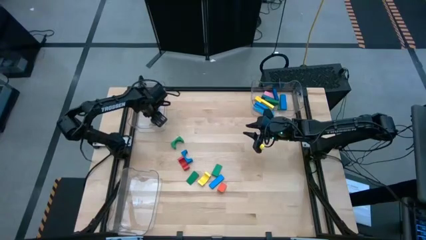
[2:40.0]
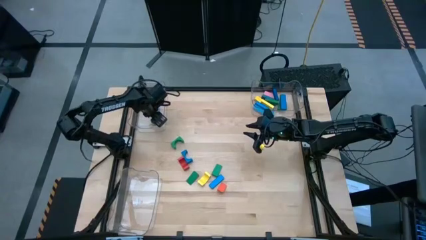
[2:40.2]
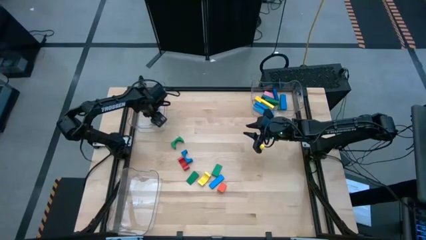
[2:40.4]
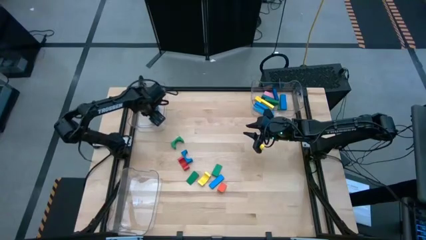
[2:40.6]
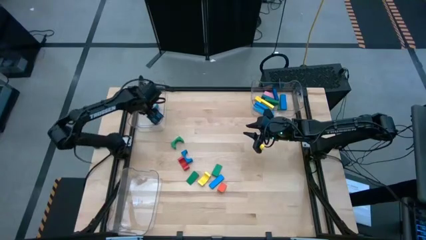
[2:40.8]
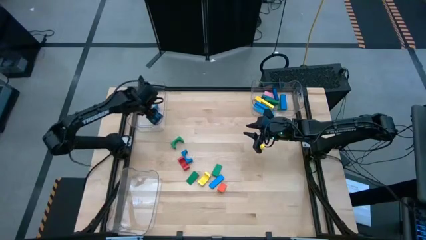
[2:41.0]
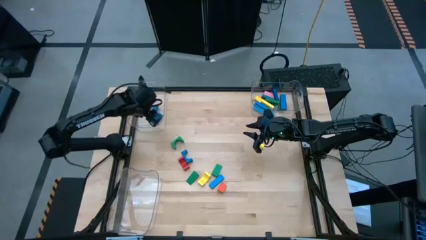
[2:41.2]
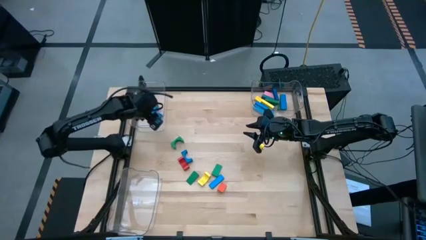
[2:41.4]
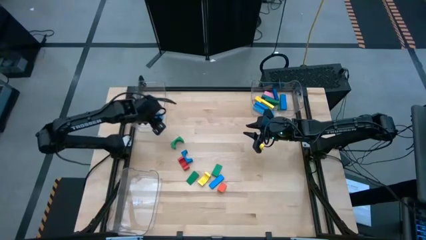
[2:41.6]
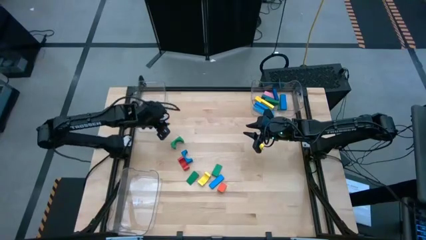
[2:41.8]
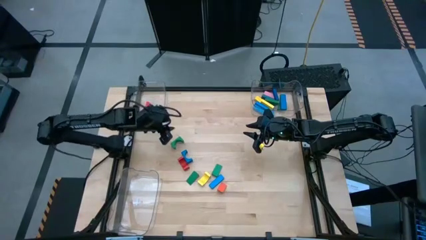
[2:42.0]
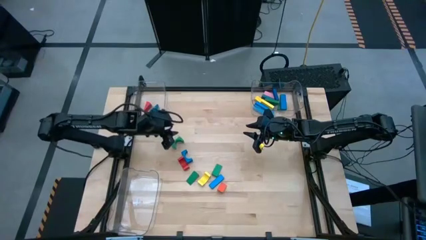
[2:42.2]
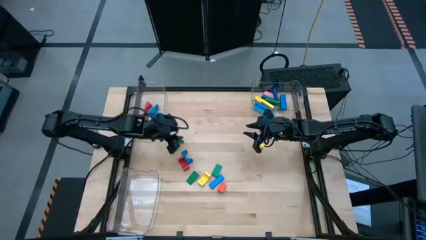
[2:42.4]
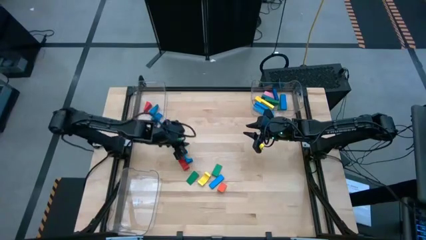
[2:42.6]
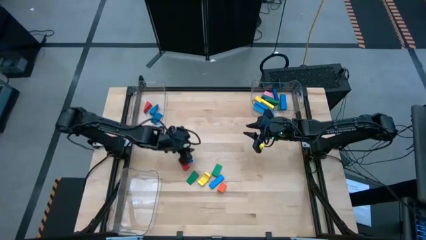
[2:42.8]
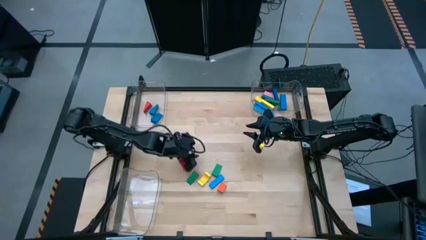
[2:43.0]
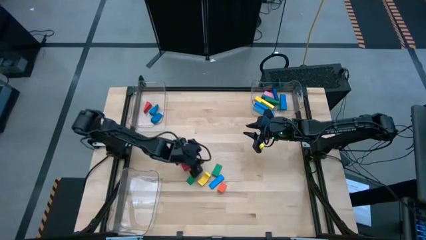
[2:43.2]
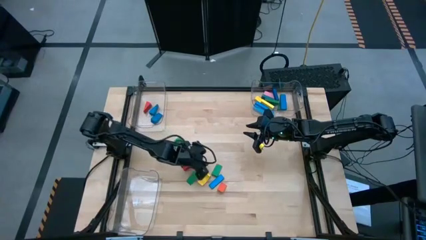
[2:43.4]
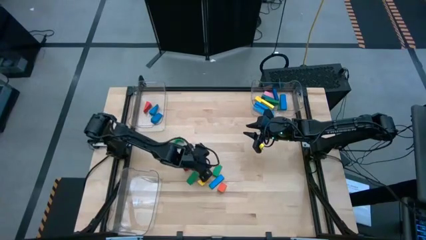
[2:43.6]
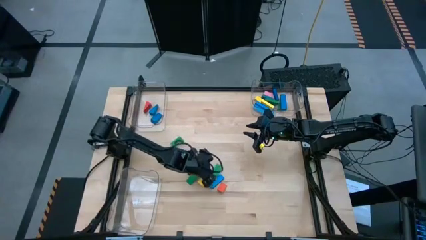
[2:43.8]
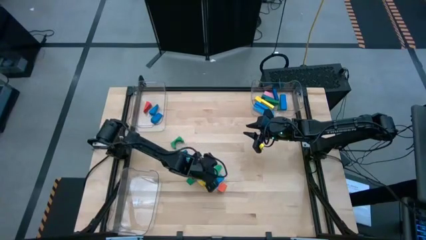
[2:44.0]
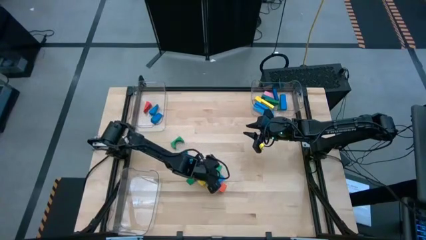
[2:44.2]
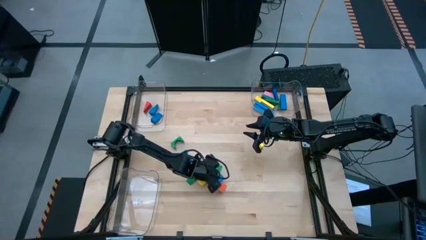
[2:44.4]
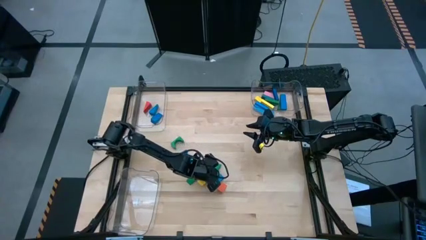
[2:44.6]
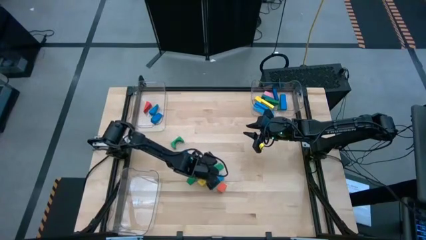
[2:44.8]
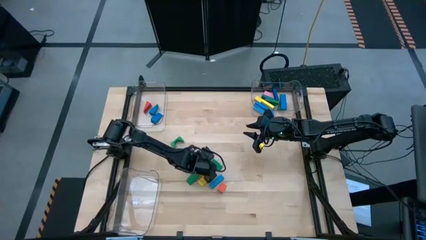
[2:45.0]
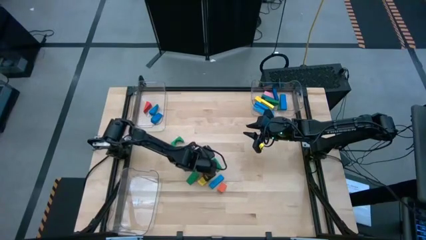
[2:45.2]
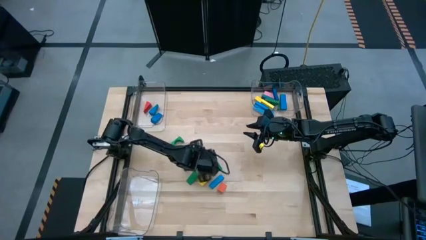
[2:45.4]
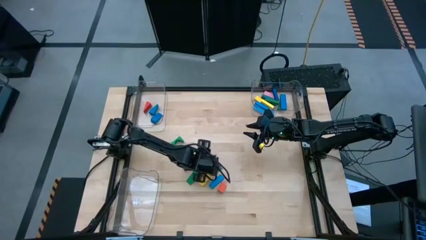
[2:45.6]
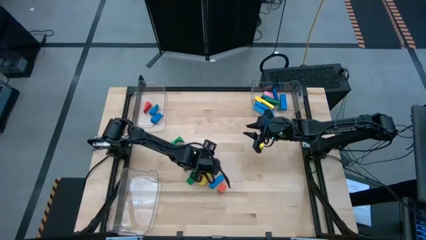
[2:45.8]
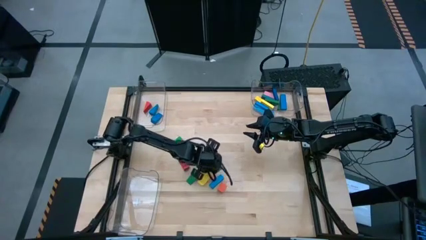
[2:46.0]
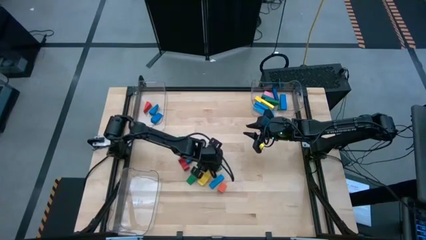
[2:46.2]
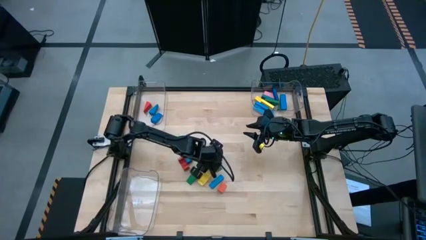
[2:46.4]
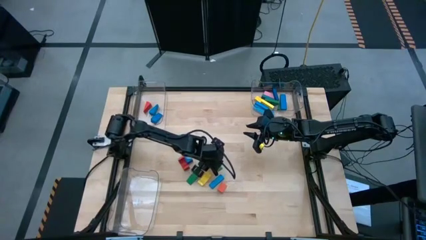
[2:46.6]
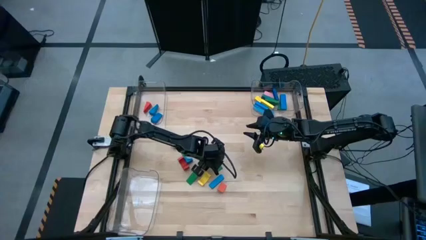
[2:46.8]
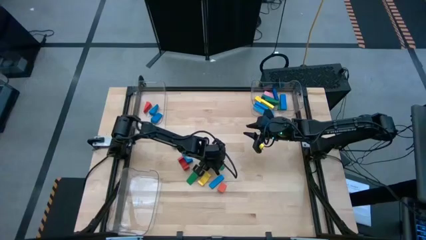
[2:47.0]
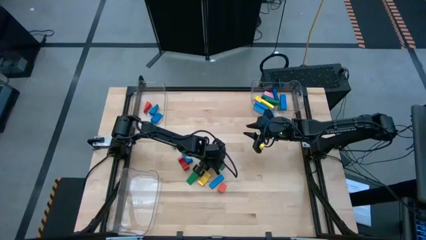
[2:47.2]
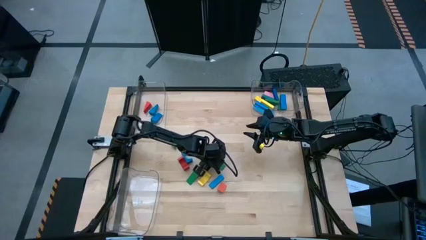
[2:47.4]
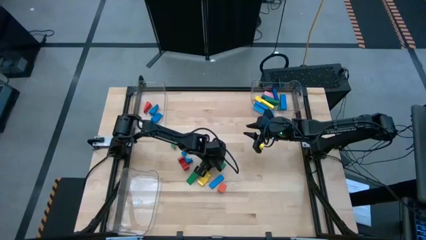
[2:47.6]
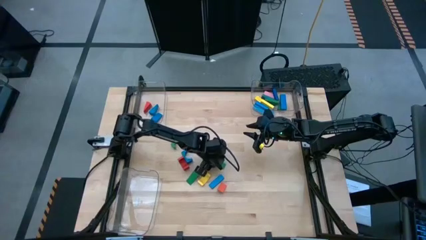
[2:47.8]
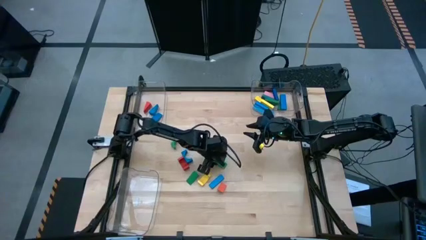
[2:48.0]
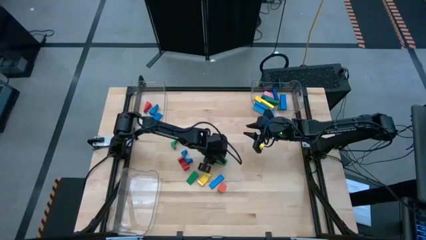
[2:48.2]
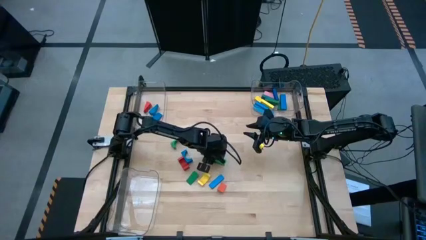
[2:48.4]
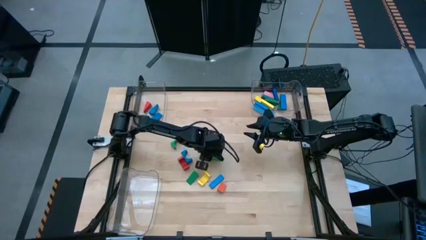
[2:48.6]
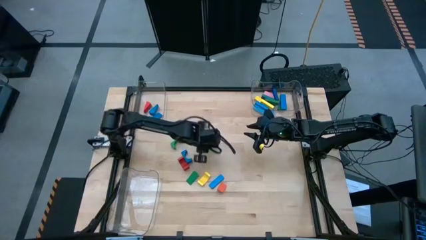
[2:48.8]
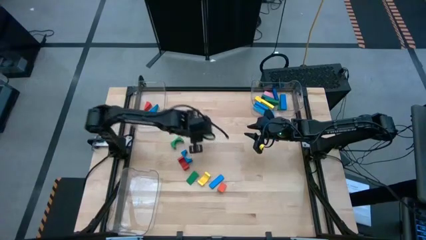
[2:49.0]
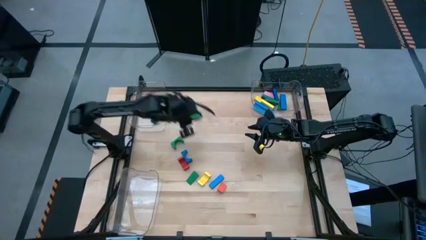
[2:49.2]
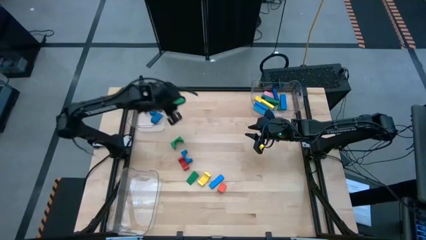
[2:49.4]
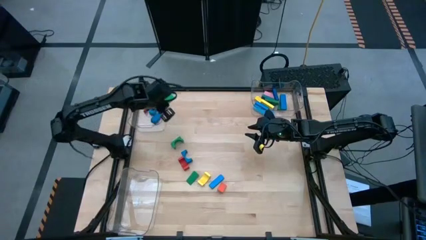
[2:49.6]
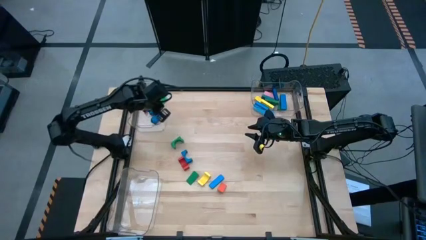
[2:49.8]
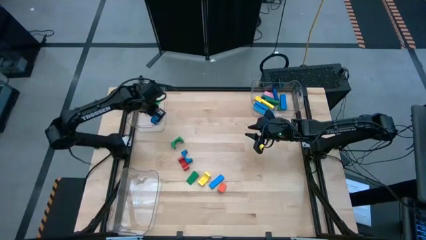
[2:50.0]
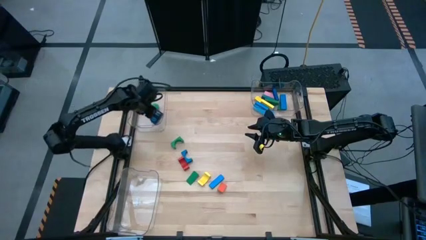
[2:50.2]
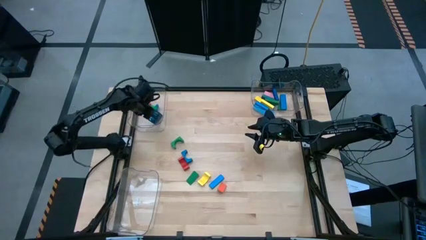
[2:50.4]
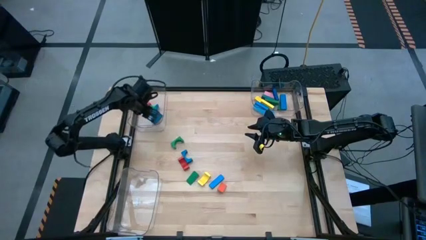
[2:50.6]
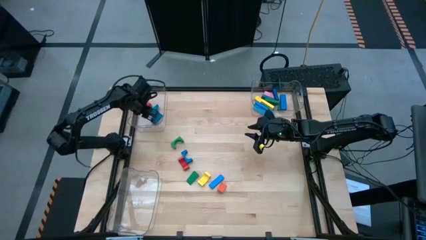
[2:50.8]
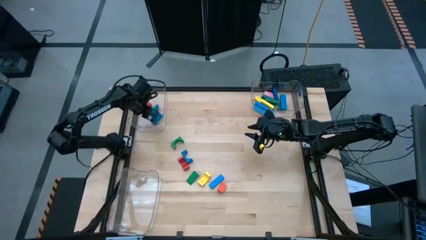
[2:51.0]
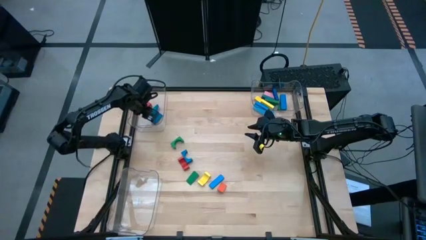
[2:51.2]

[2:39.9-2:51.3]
Task: Sort blocks by size
Put the green triangle block into the top left transparent bin

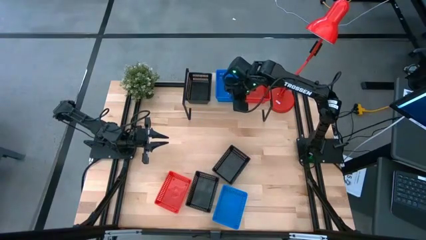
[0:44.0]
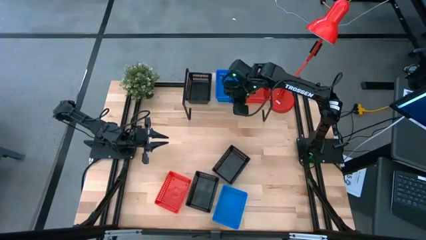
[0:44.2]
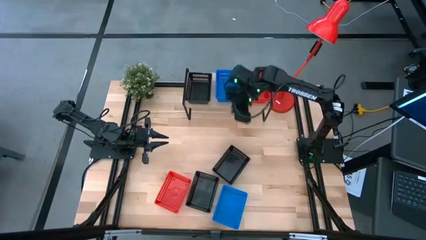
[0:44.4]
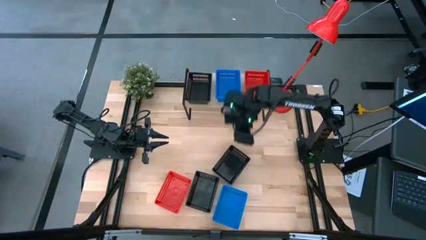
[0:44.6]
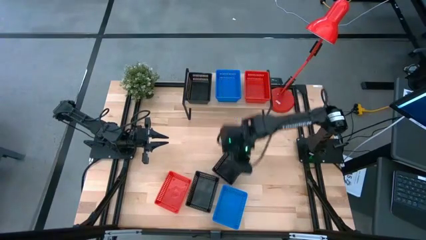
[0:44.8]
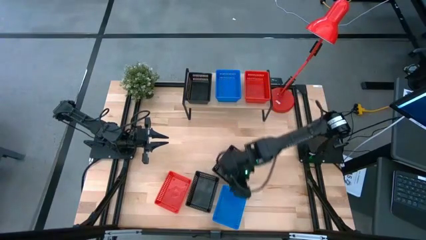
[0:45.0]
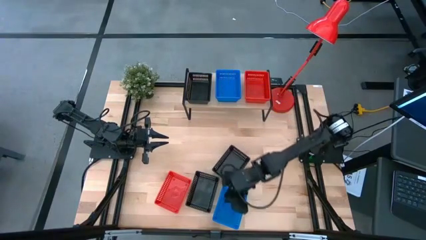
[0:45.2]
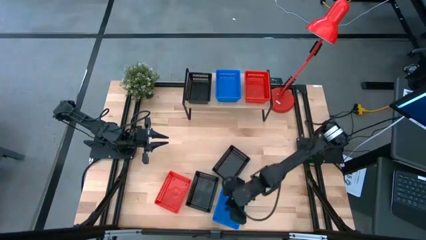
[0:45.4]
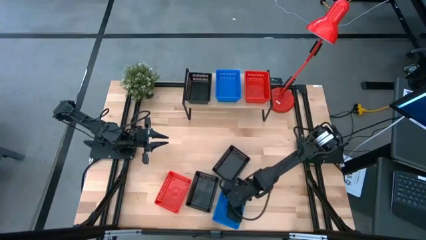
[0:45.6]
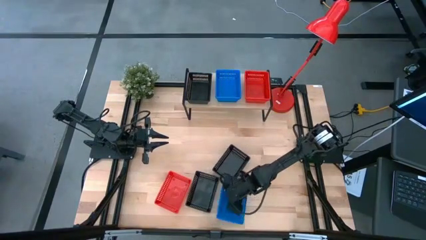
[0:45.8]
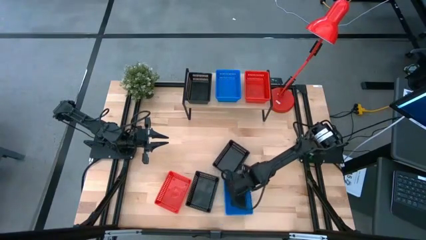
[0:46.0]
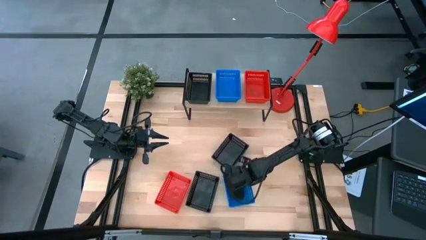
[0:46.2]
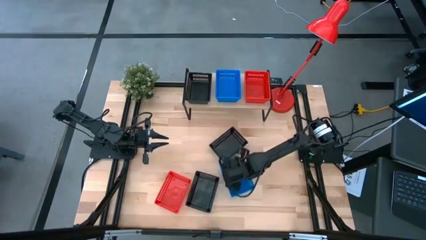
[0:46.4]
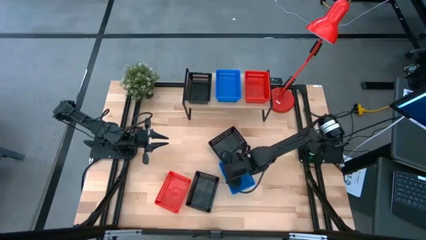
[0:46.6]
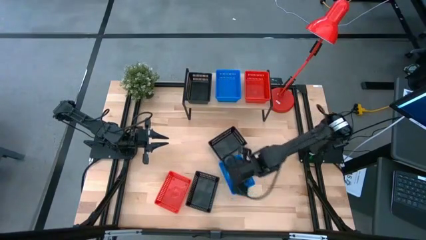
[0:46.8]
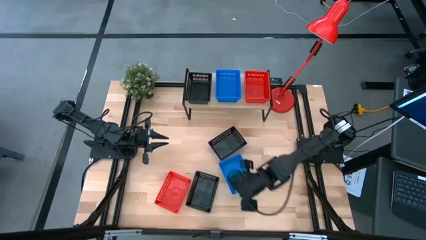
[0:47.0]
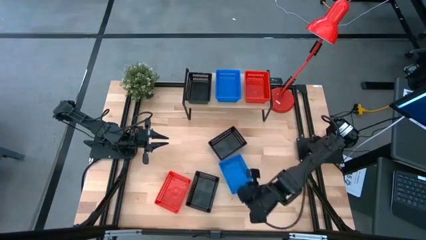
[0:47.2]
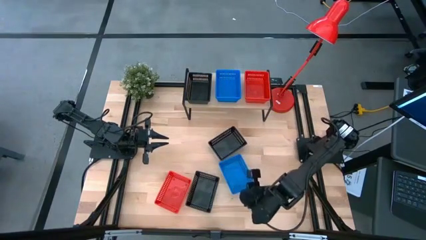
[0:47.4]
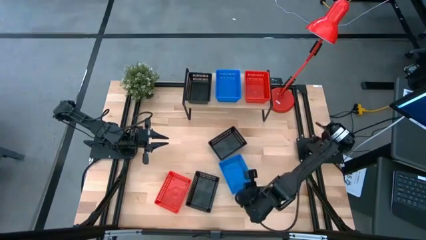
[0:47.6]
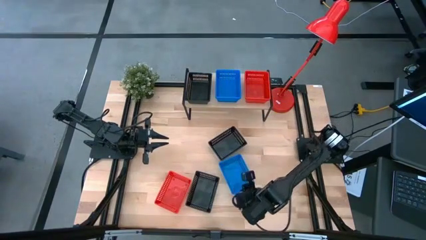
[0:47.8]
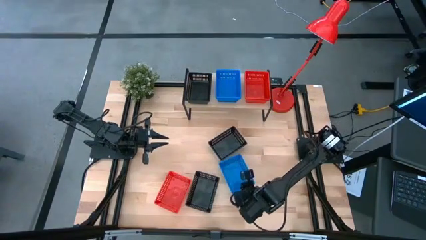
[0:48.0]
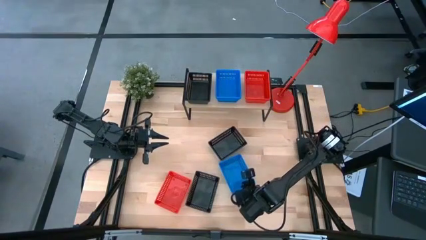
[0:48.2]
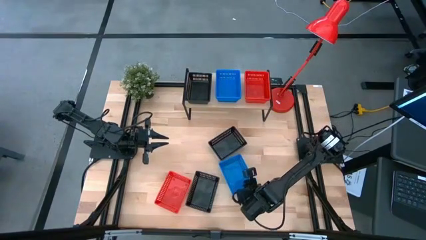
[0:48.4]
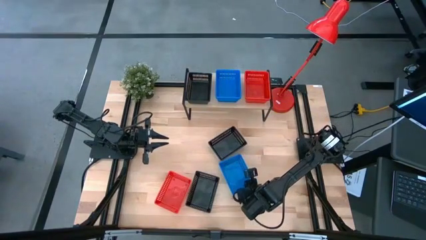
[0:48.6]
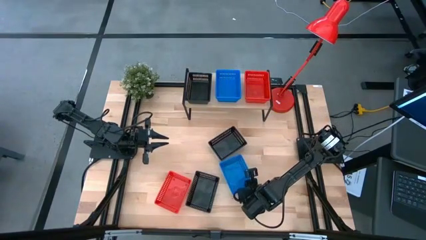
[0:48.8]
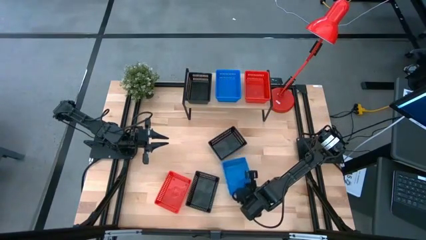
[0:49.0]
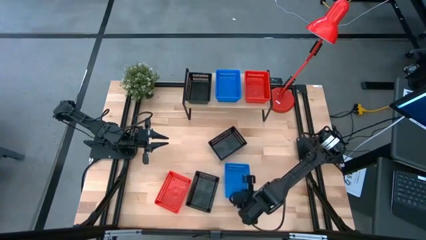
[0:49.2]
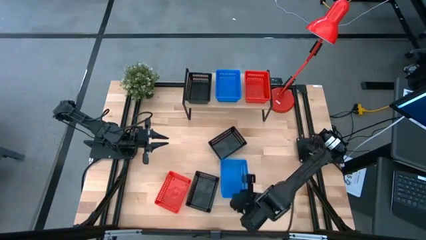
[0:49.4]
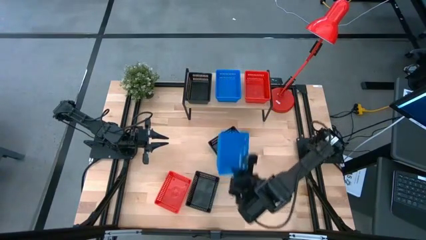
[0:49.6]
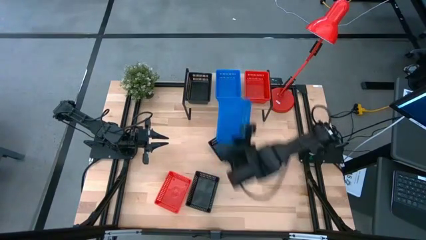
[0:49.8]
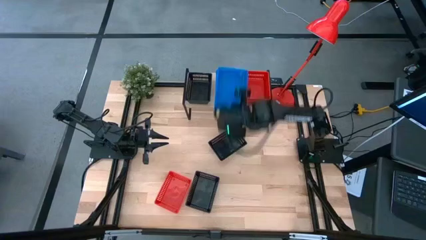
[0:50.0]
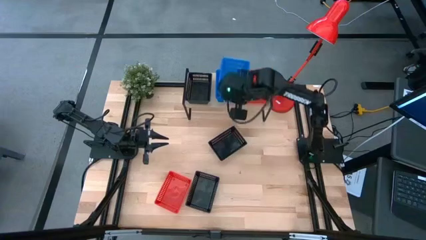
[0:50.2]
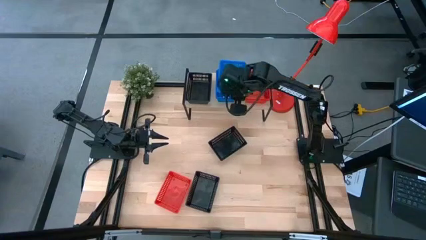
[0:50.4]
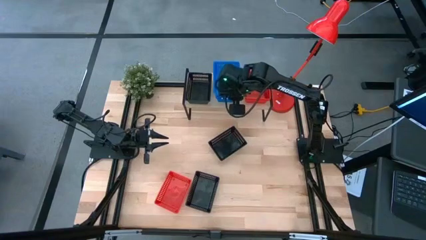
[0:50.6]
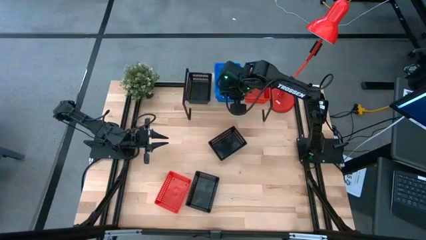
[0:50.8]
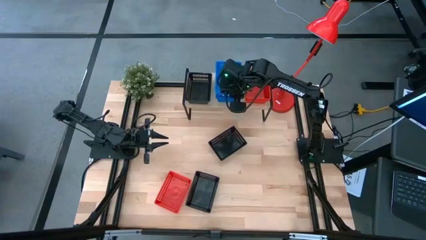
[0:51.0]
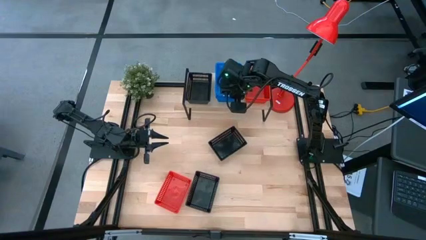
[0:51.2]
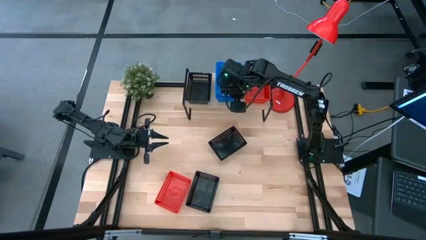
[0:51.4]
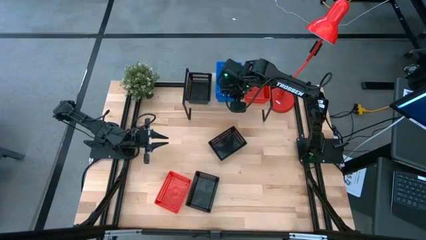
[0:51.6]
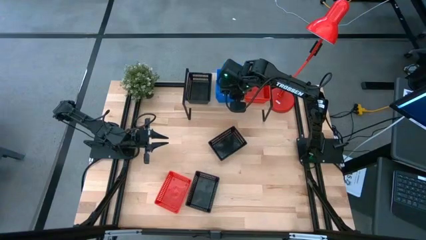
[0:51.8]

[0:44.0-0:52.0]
Task: Stack baskets on shelf by color
Stack the blue basket on top of the stacked blue basket on the shelf
